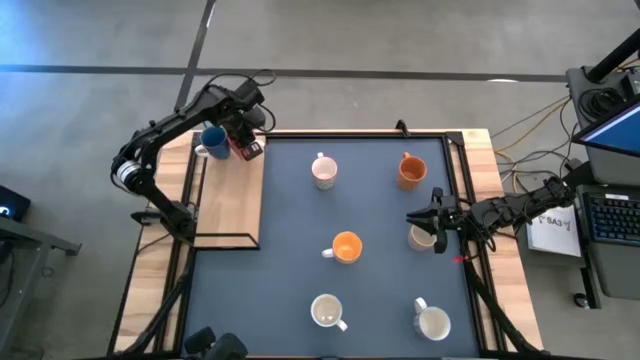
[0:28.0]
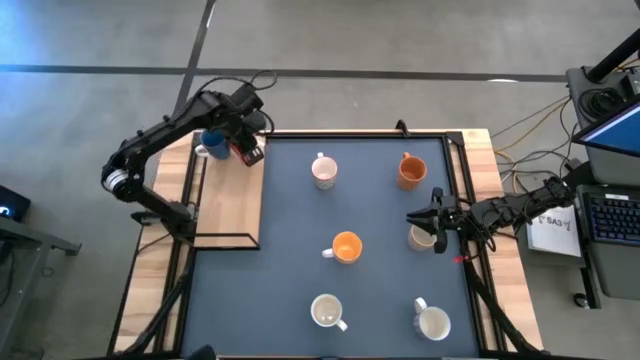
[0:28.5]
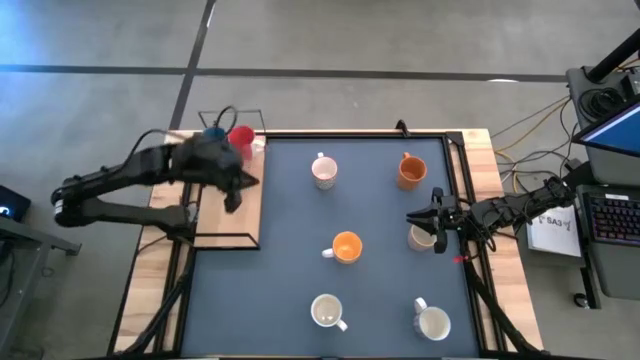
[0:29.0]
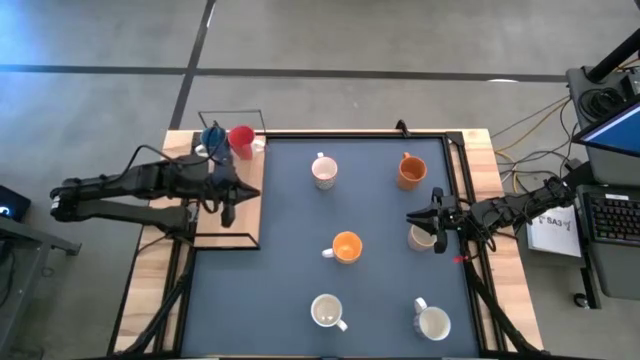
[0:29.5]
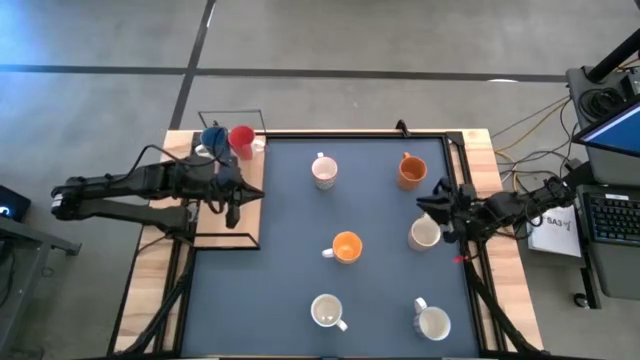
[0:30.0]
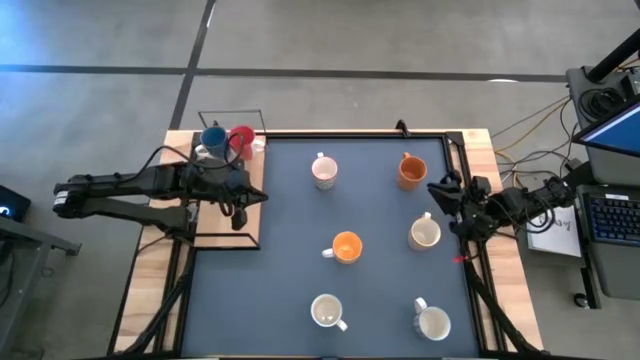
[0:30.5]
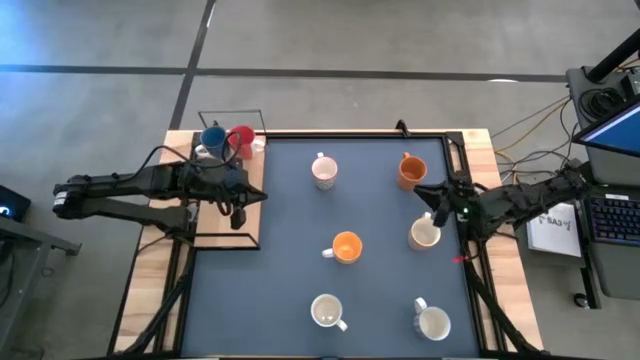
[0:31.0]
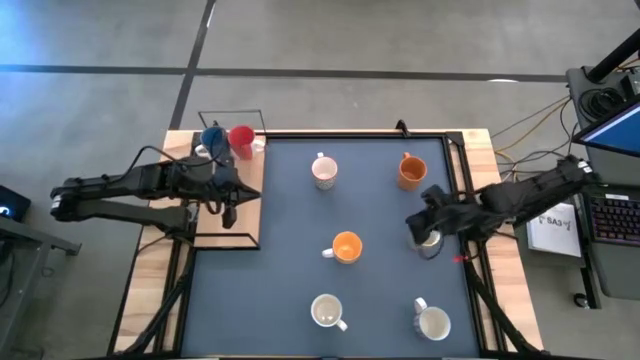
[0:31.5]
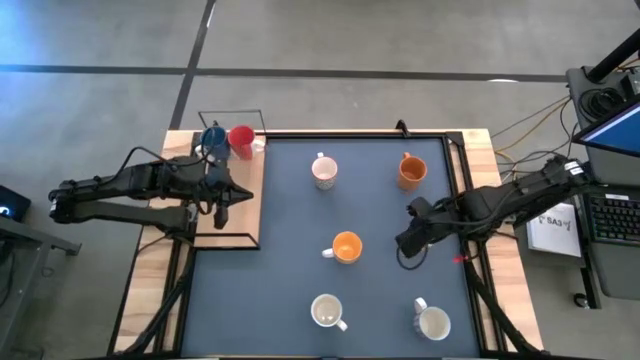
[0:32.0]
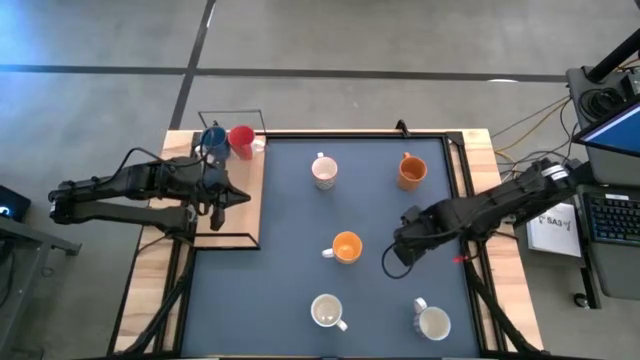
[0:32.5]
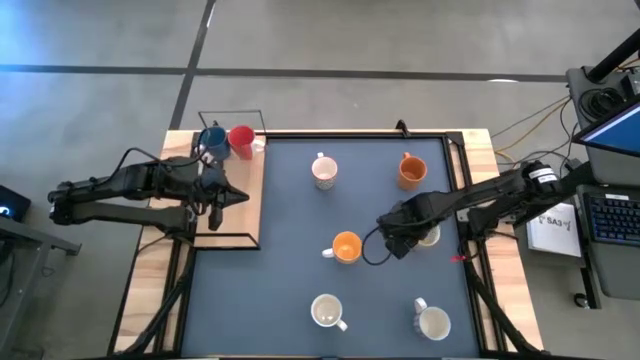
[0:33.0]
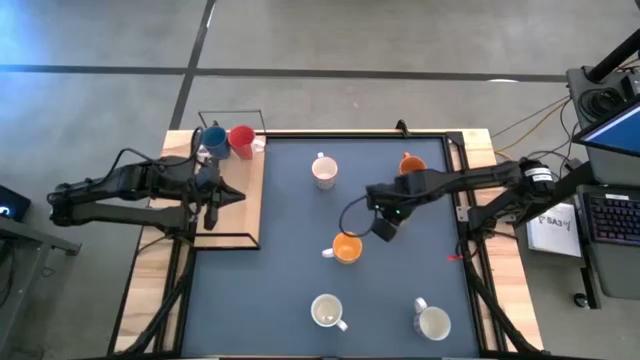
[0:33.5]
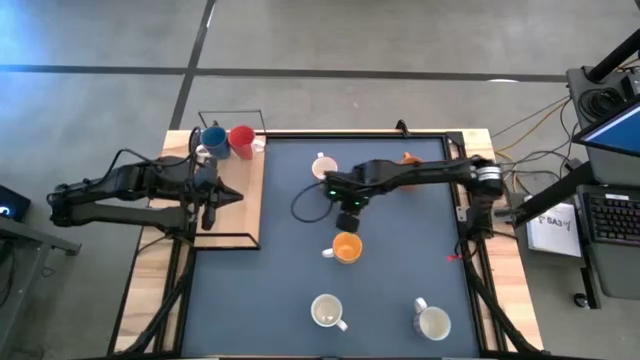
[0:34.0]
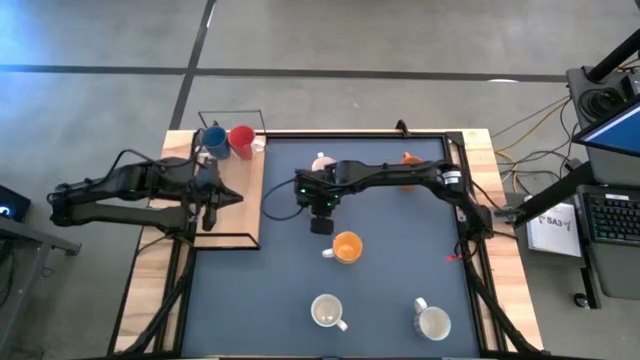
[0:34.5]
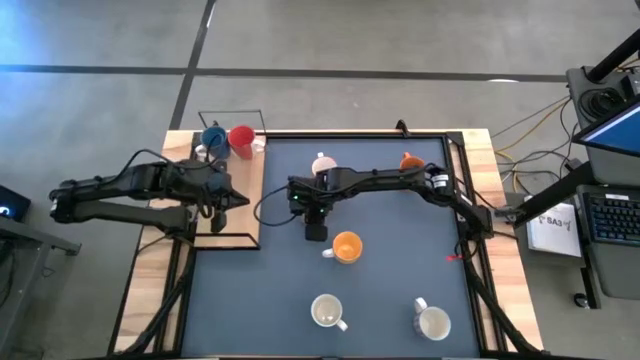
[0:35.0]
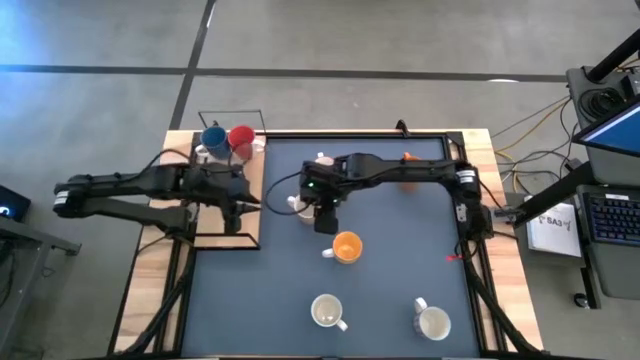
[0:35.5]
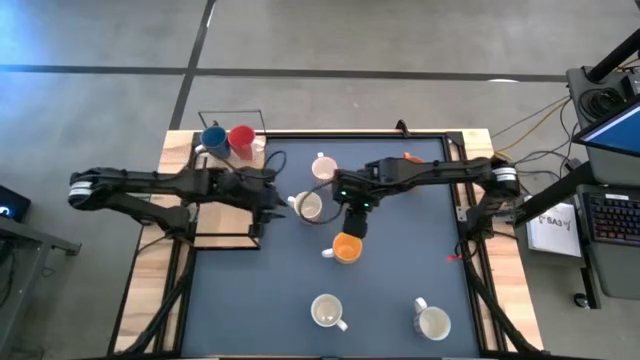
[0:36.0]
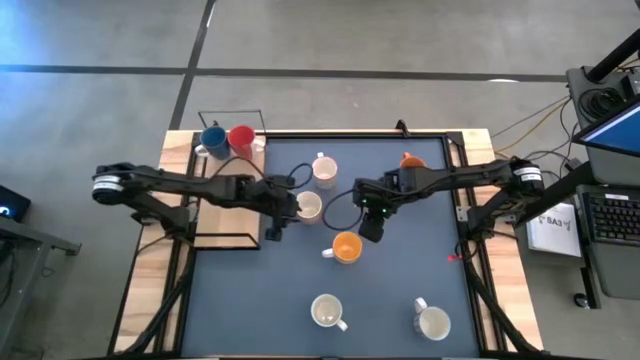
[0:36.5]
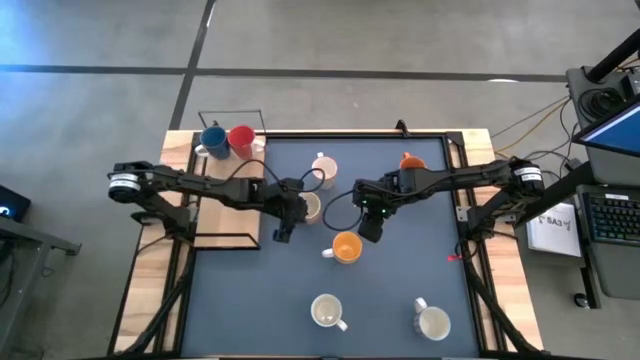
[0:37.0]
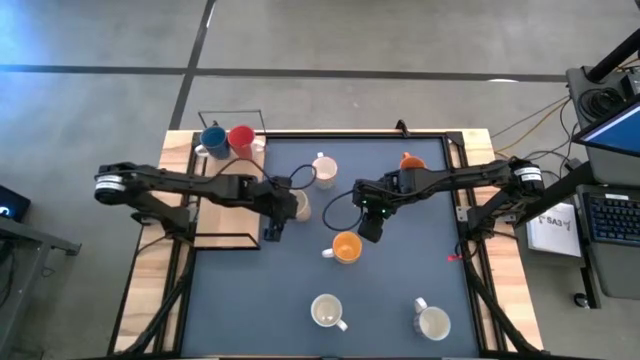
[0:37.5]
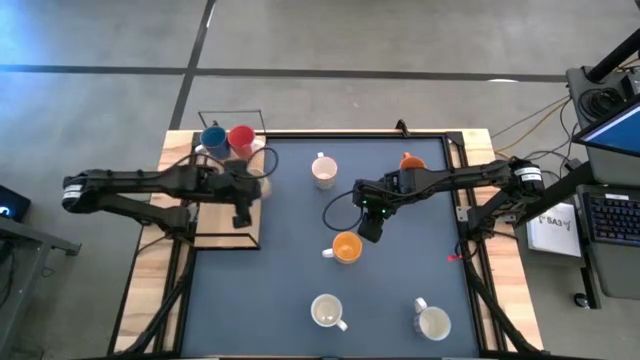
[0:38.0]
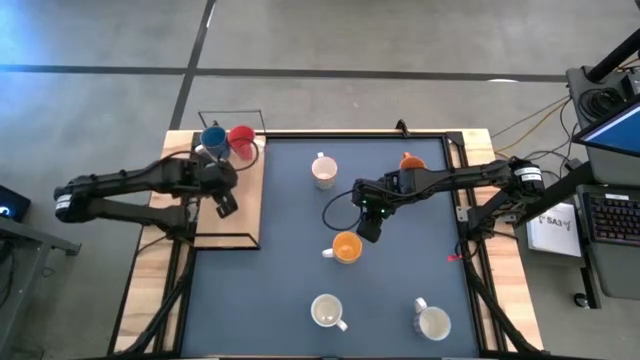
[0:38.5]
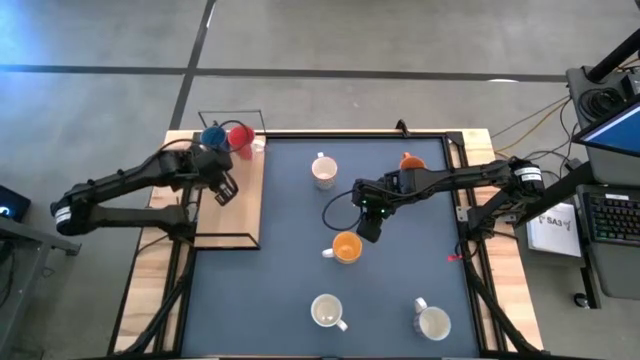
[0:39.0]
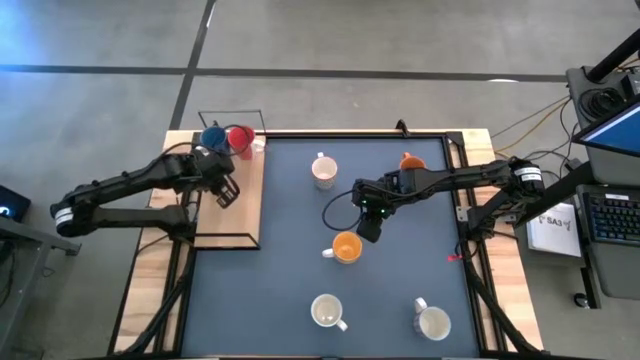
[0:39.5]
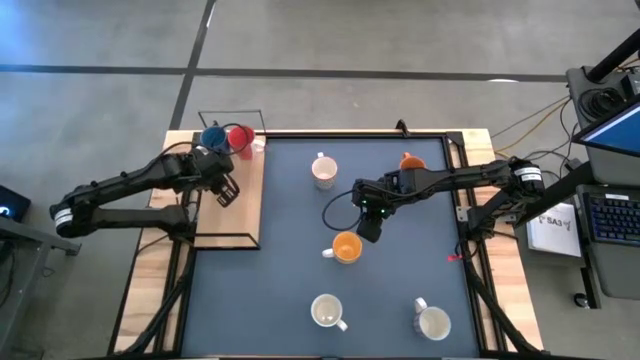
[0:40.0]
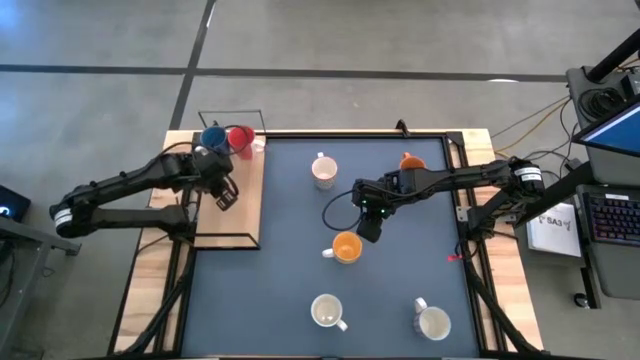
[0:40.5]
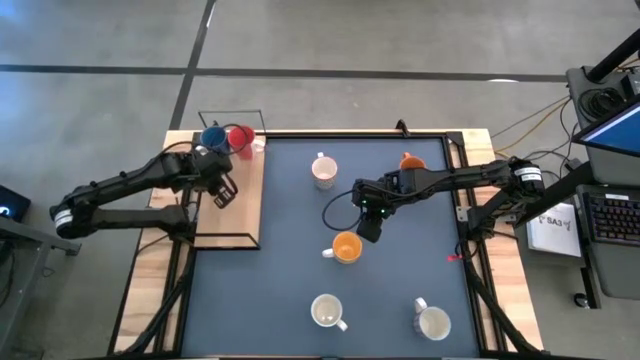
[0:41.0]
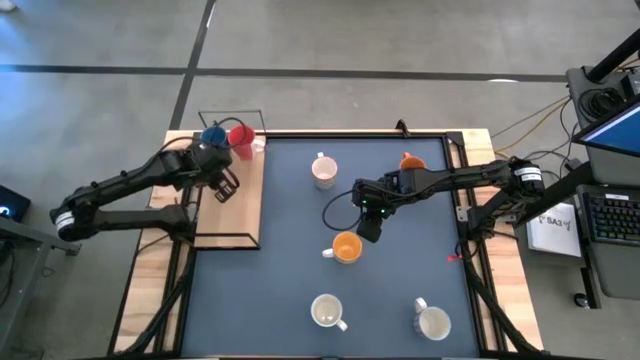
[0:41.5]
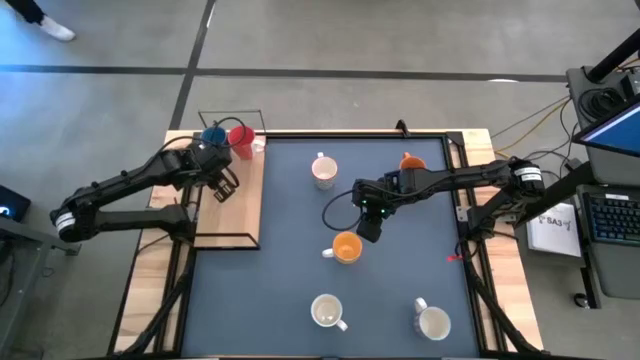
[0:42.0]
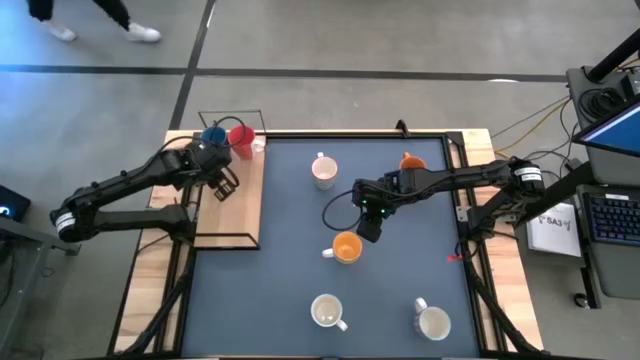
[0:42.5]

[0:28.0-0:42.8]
Task: Place coffee mugs
Put the red patterned mug on the shelf
